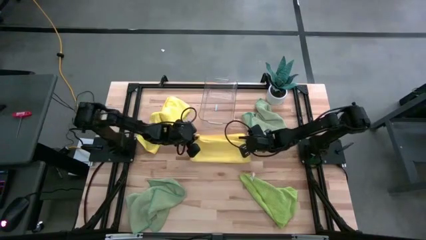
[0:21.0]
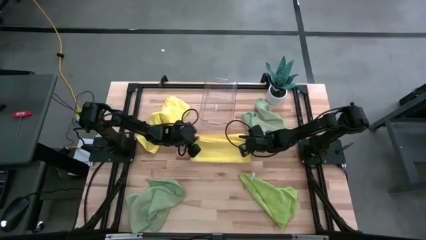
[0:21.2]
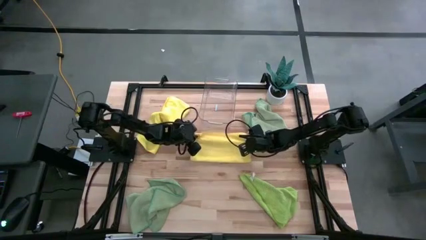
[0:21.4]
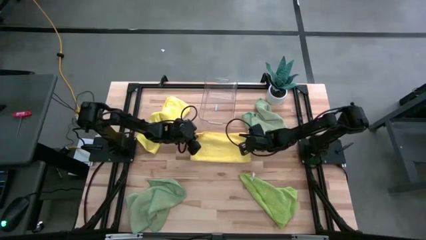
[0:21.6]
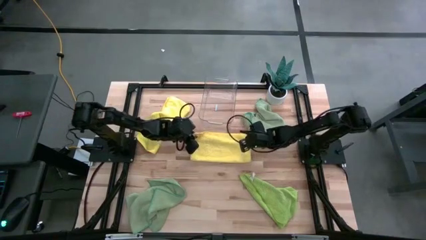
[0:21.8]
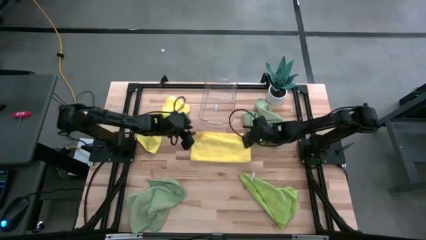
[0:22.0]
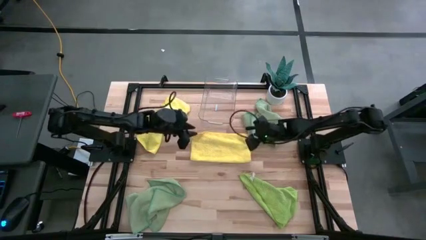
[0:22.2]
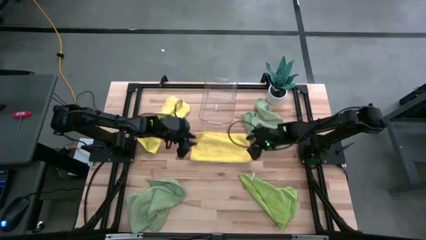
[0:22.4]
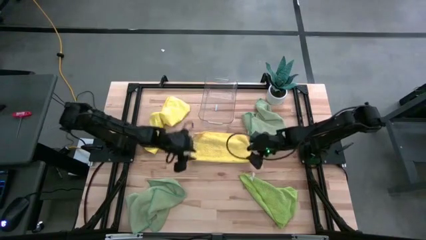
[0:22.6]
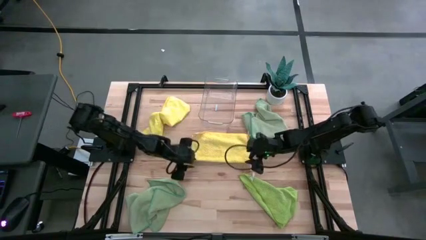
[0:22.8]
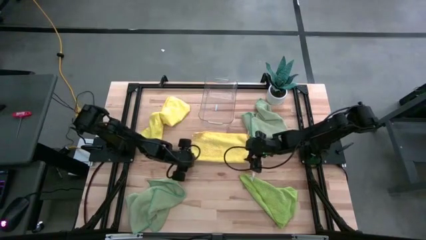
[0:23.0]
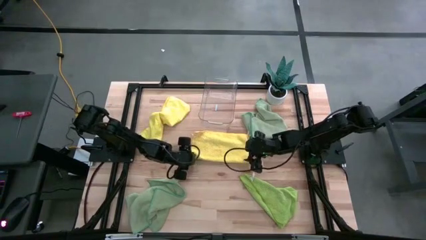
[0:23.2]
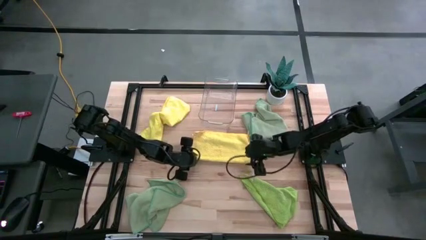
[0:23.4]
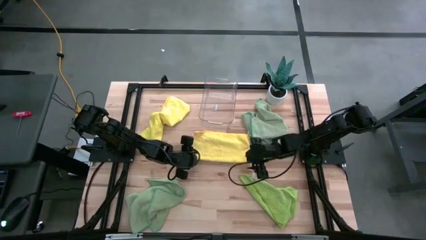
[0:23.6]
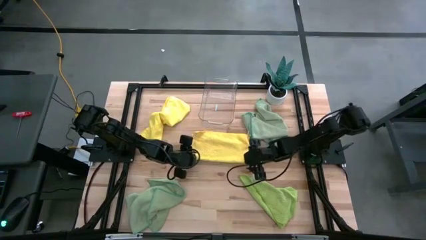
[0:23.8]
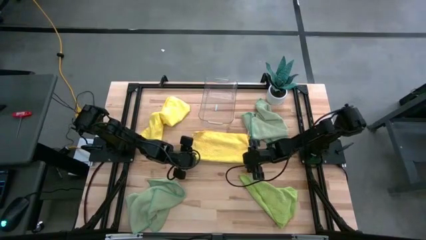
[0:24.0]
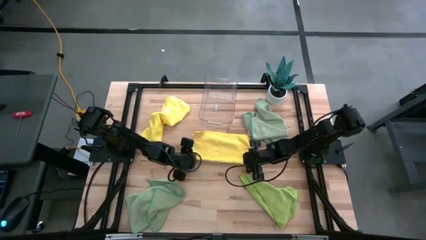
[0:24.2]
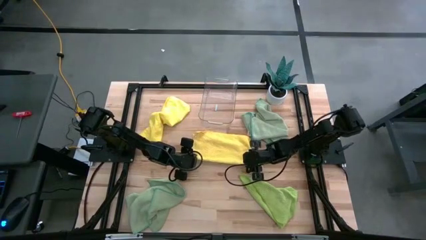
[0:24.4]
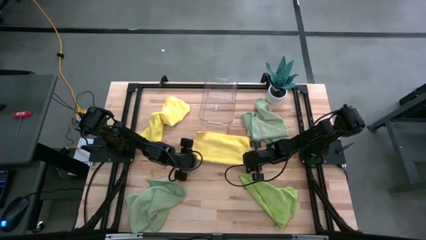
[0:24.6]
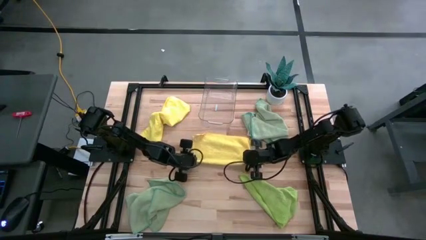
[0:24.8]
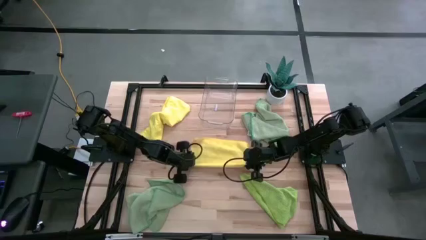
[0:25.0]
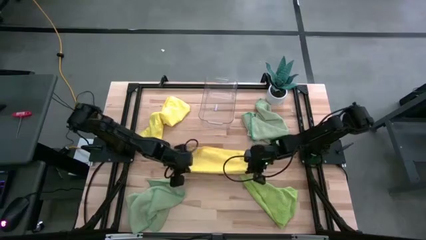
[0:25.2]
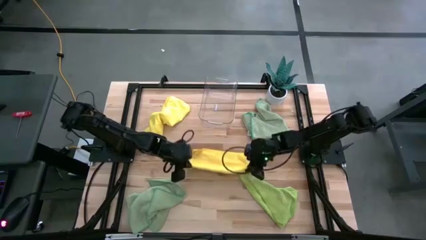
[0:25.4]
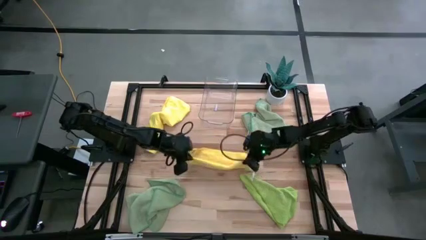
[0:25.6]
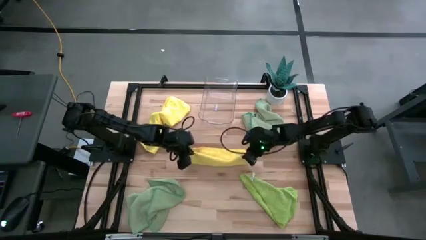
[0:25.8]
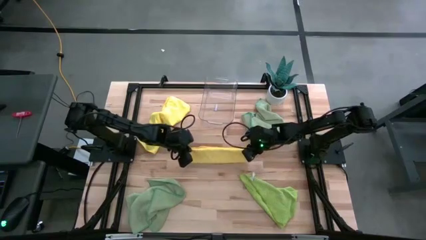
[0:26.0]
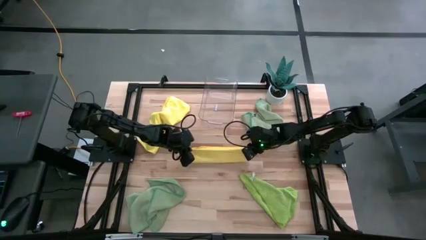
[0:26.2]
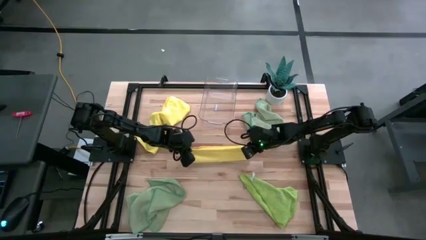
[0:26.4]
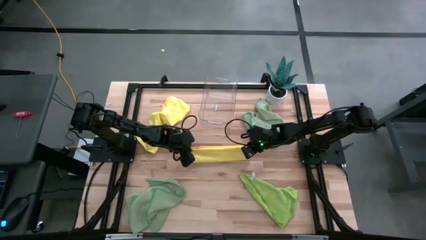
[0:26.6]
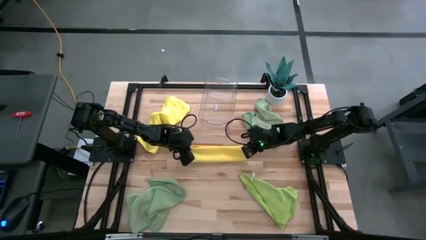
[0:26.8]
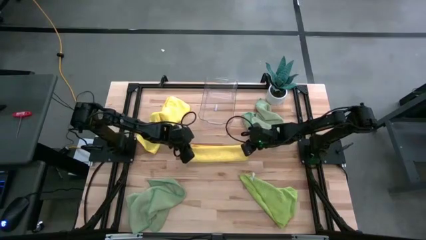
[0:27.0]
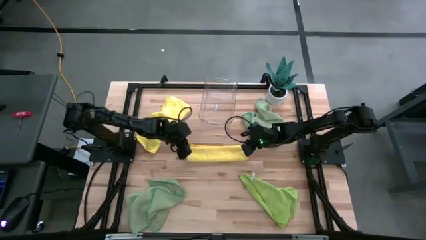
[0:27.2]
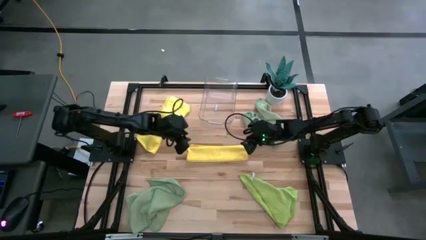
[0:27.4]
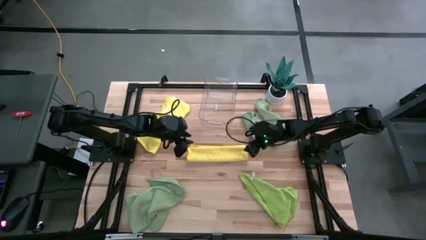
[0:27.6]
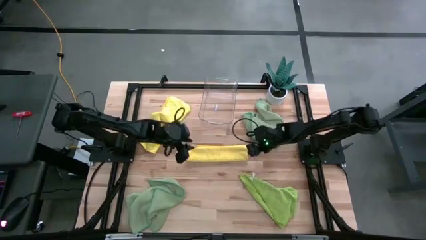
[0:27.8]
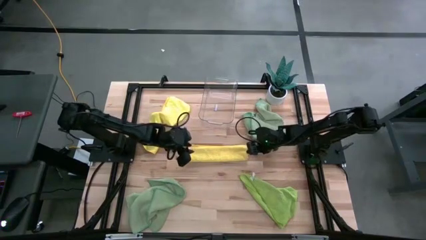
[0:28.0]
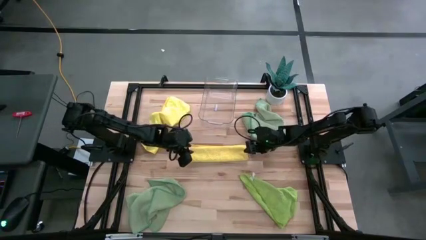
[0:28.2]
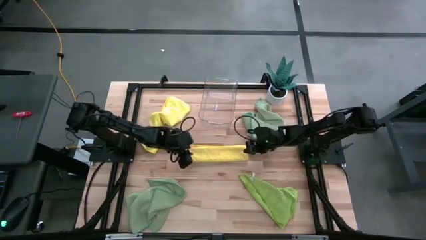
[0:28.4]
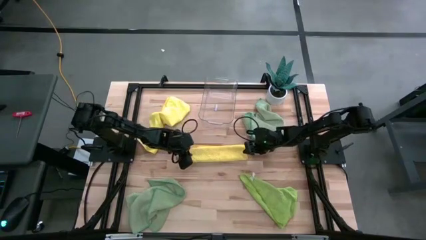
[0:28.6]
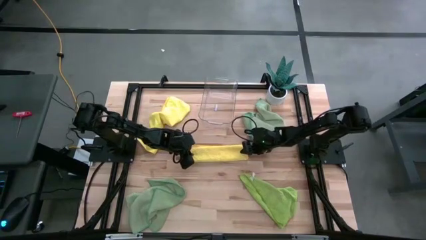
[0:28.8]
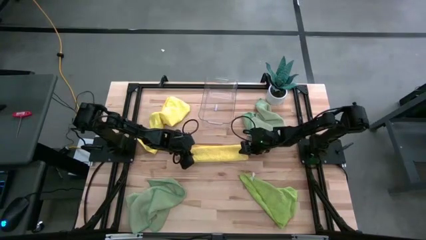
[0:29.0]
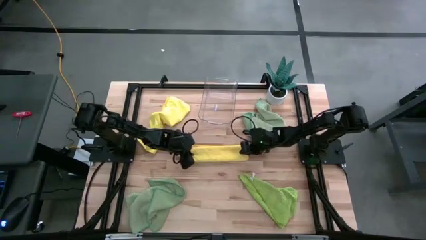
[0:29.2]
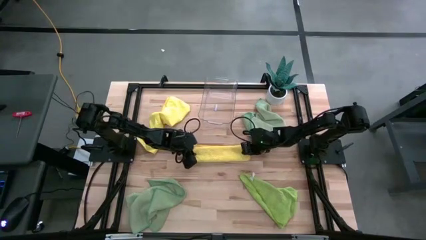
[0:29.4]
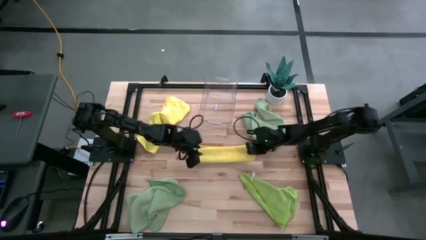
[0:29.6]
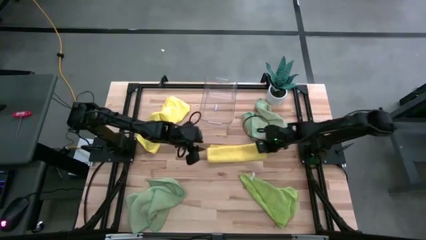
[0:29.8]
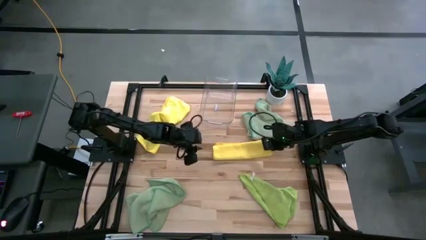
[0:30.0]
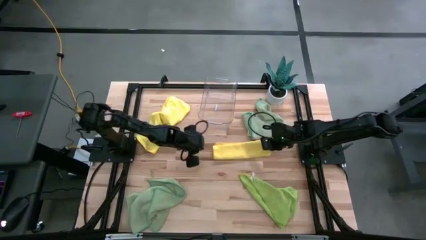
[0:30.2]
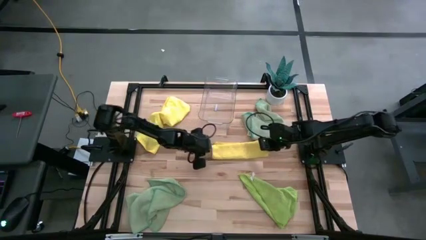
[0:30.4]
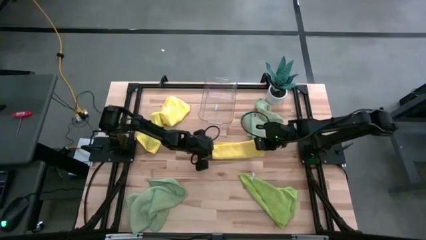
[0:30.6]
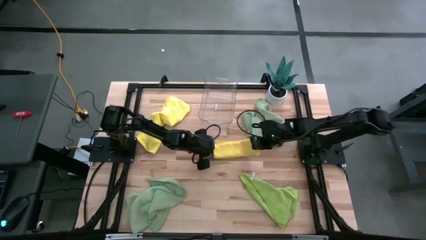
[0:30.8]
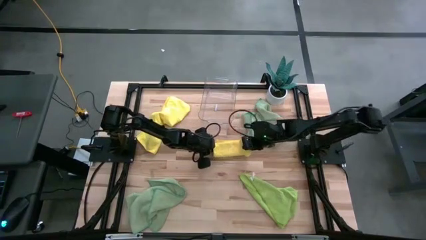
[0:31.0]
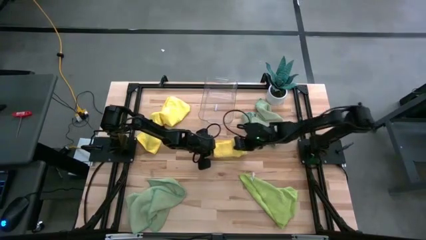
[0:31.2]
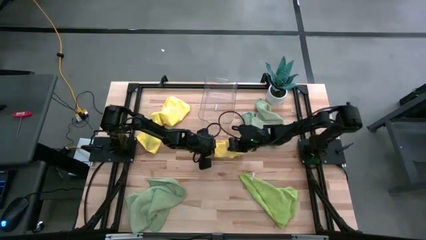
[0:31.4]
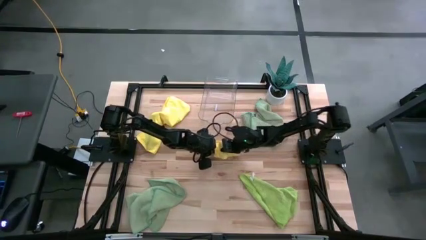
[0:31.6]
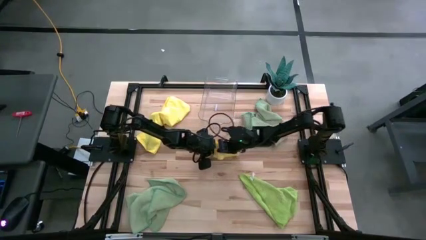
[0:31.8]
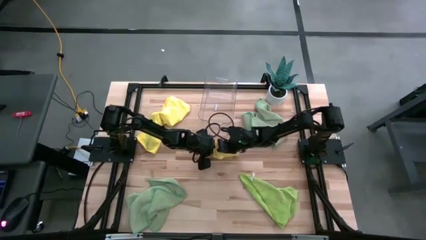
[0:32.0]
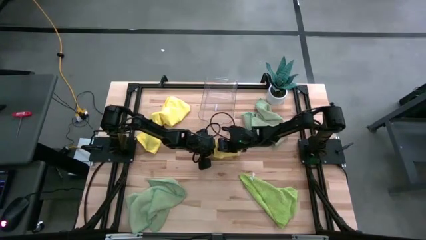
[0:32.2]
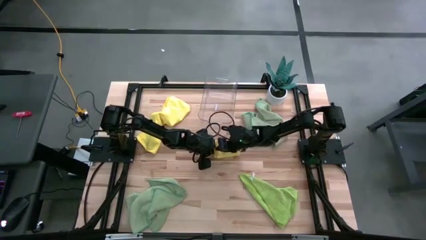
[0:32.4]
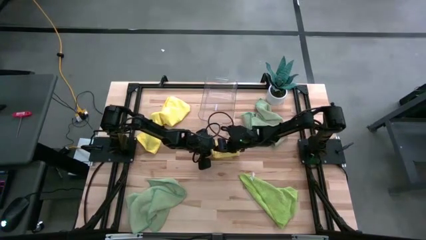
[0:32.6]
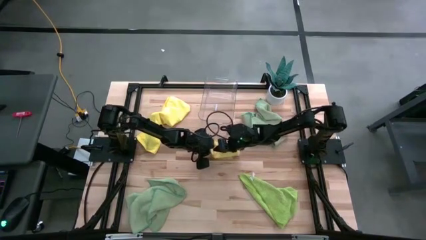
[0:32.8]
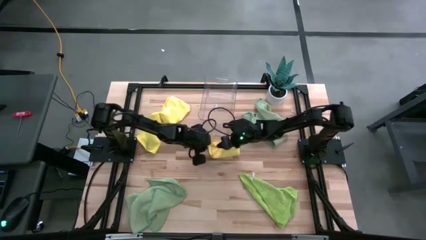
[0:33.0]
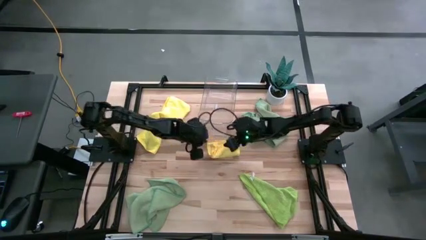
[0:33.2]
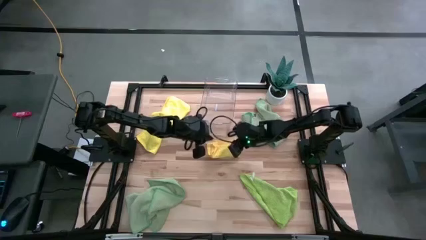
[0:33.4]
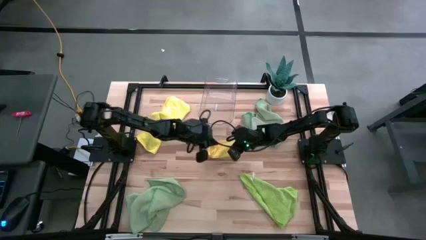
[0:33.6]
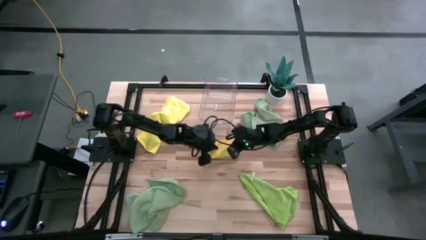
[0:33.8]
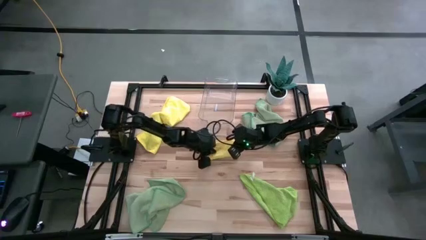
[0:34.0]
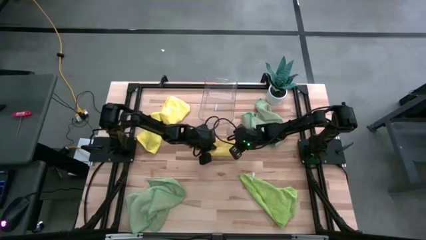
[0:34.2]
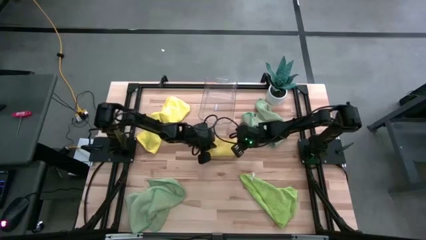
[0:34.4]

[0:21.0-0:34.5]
Task: Fold microfiber towels
Fold the right yellow towel
